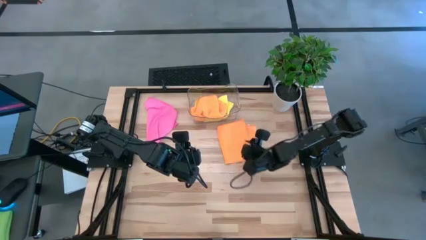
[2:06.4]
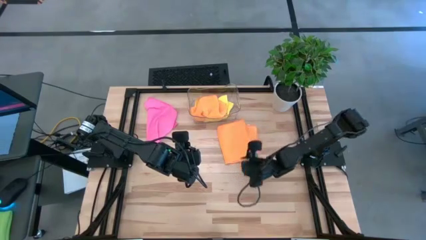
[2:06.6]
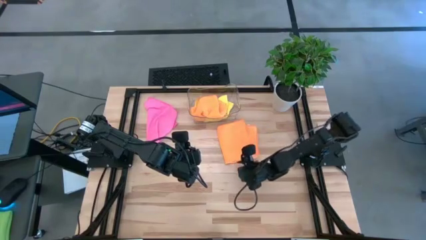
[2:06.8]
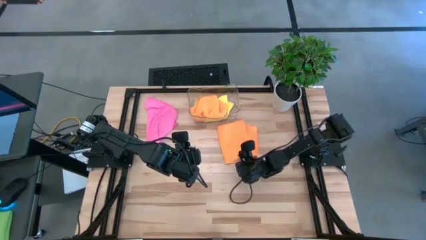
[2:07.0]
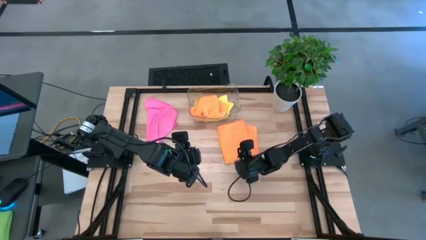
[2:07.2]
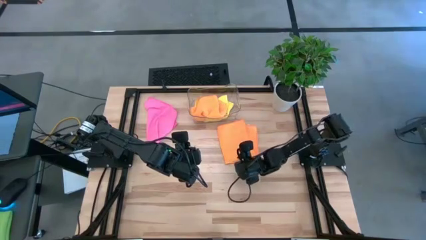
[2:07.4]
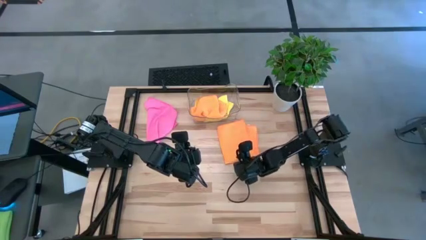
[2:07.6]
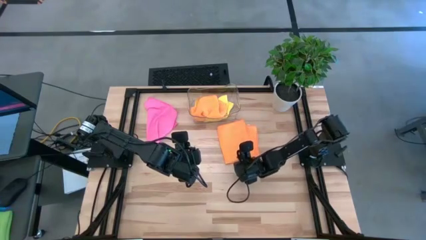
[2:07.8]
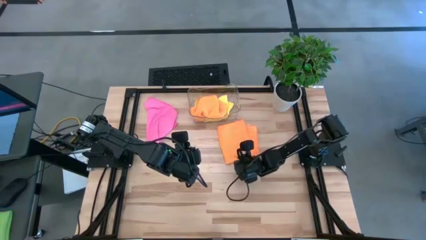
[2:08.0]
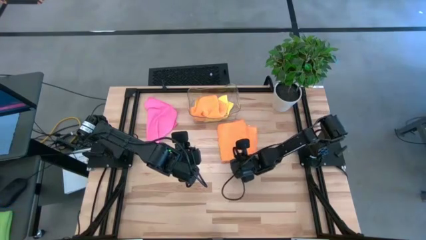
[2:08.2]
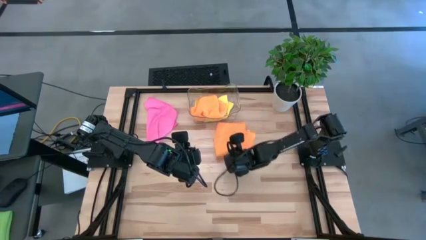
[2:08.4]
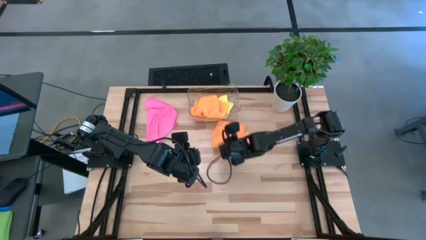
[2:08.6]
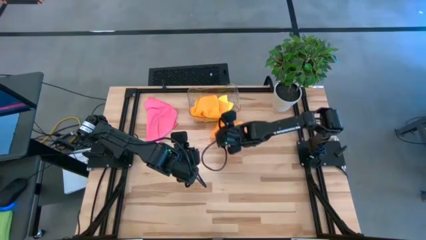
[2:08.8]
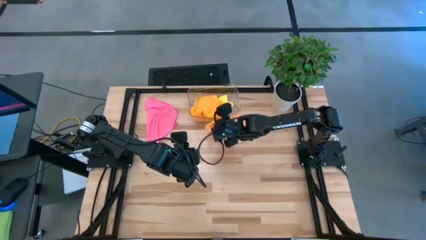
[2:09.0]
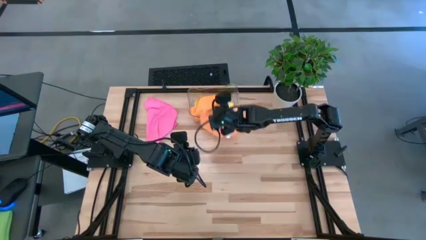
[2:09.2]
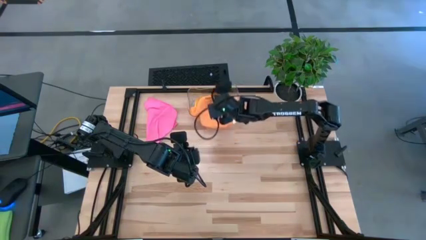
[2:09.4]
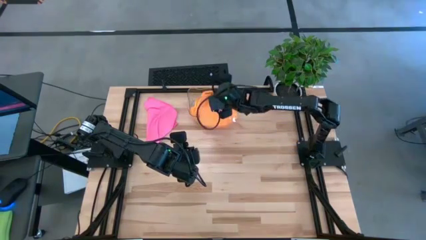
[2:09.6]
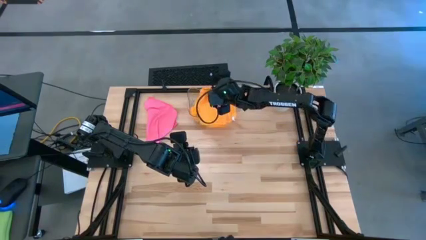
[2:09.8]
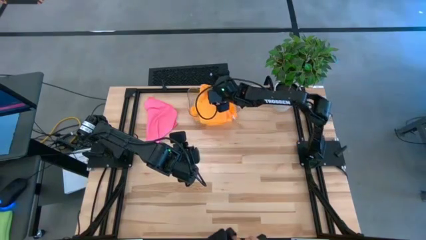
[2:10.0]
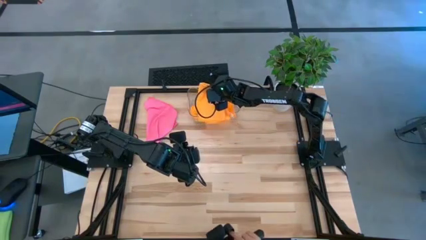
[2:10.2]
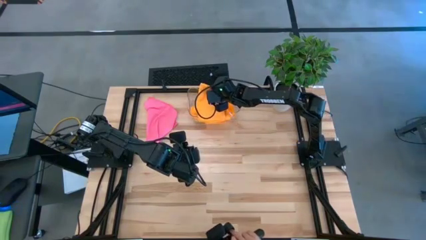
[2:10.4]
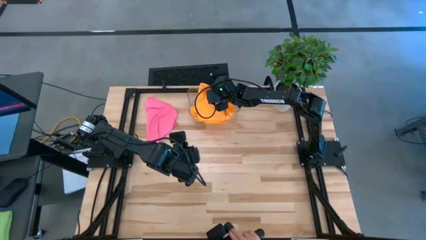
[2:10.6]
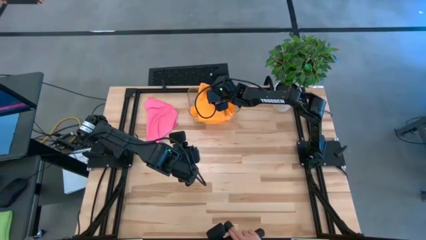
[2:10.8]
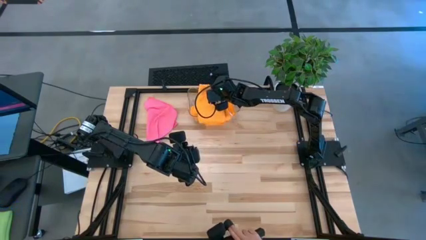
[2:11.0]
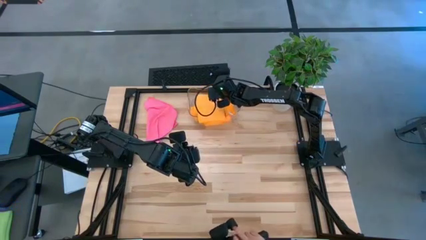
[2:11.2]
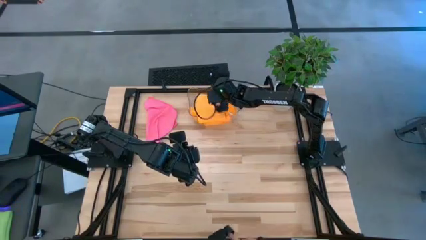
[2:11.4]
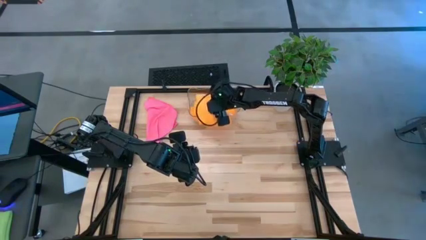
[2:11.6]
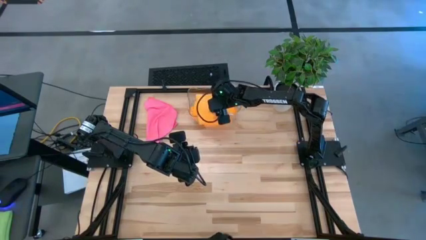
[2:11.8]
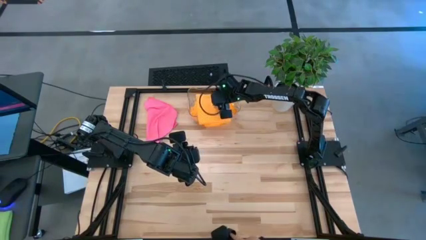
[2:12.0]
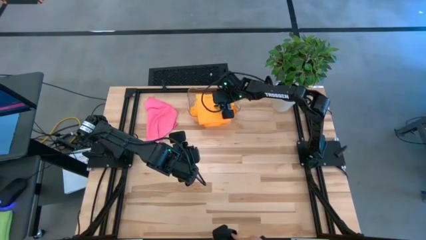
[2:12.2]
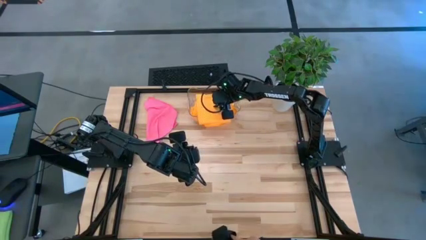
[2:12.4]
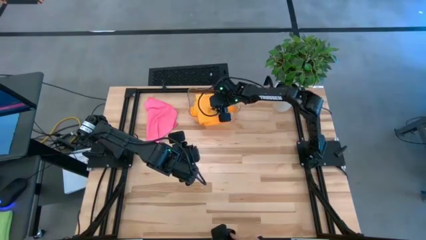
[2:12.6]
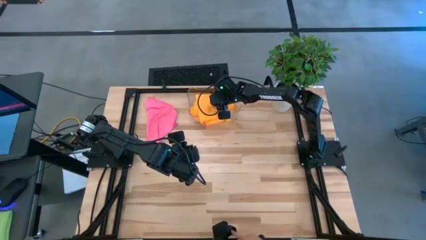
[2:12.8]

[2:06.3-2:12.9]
Task: Fold microfiber towels
Put the folded orange towel into the transparent bin

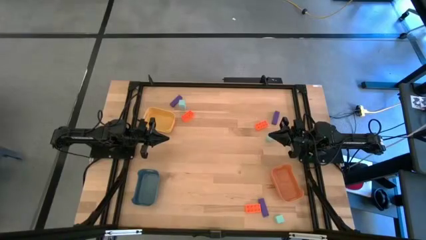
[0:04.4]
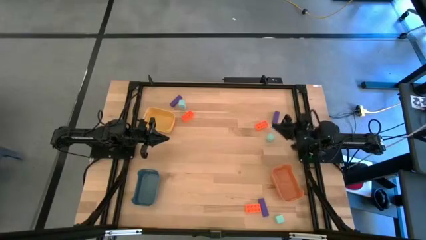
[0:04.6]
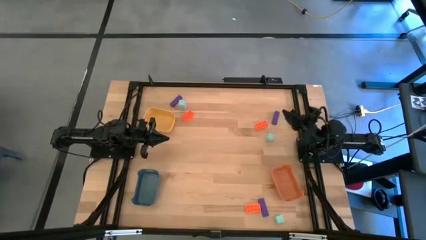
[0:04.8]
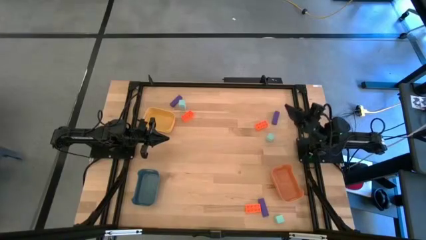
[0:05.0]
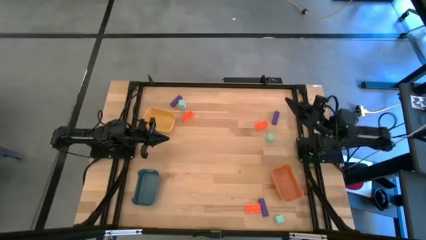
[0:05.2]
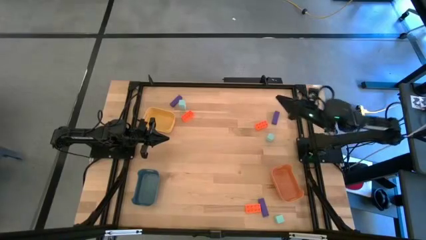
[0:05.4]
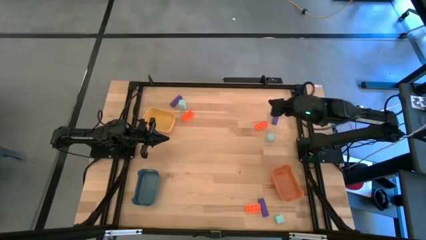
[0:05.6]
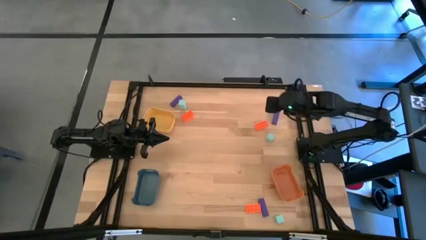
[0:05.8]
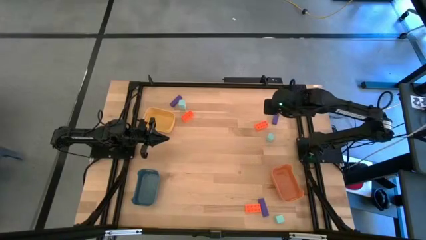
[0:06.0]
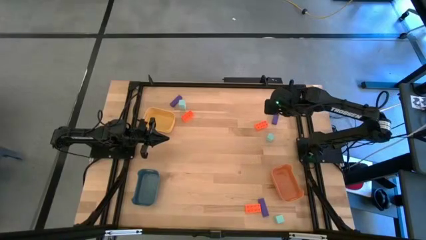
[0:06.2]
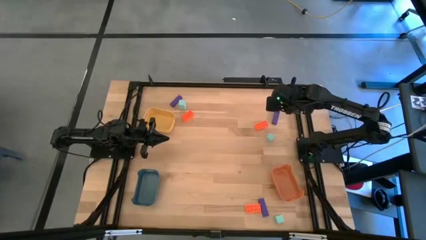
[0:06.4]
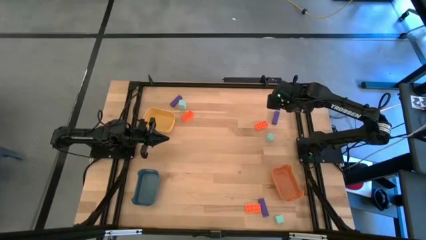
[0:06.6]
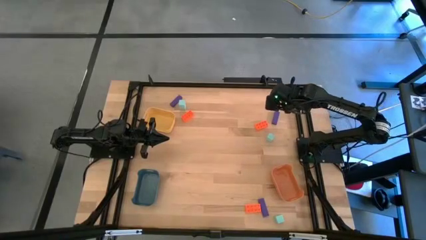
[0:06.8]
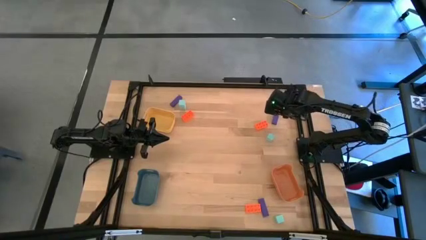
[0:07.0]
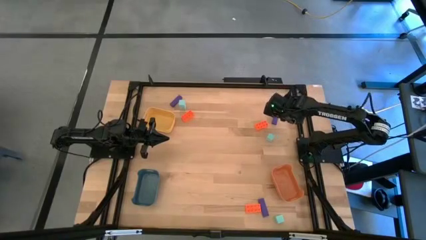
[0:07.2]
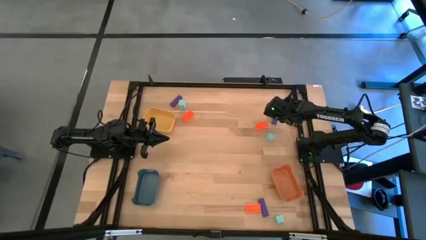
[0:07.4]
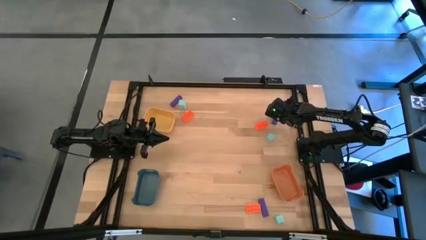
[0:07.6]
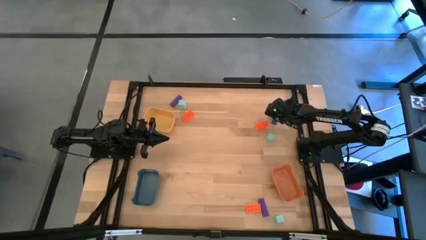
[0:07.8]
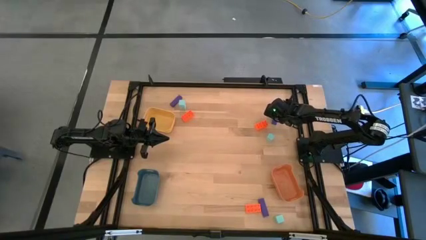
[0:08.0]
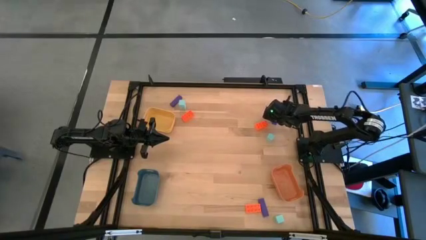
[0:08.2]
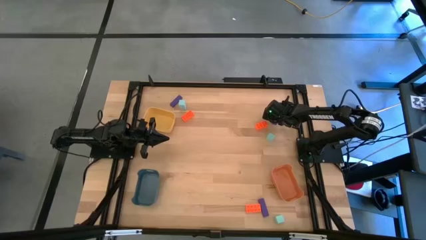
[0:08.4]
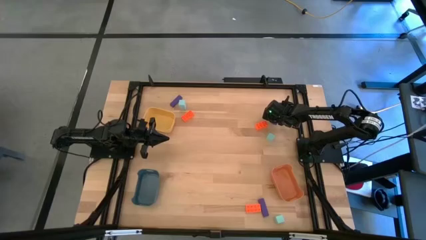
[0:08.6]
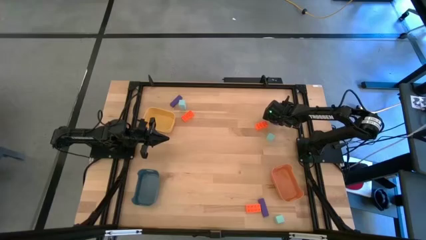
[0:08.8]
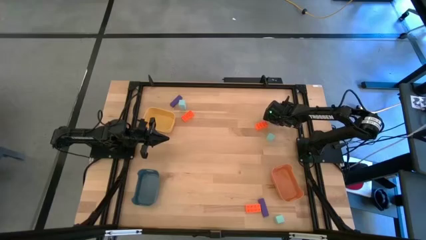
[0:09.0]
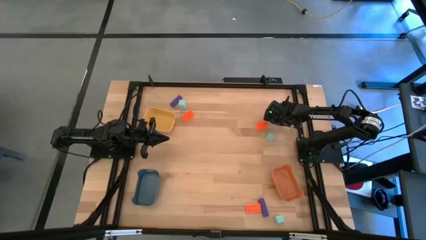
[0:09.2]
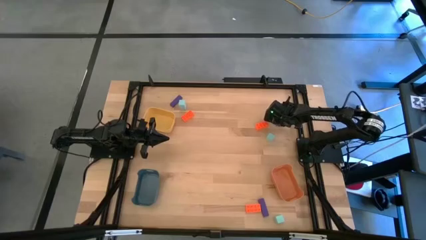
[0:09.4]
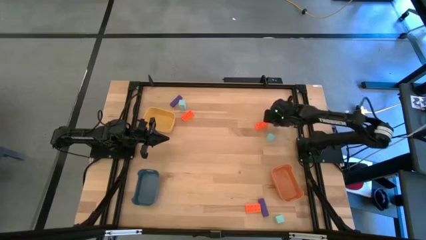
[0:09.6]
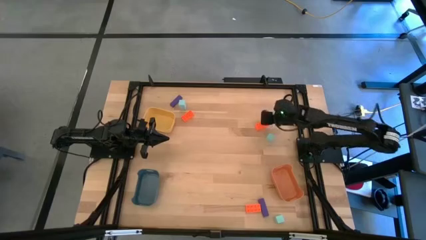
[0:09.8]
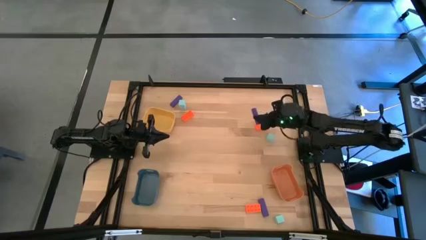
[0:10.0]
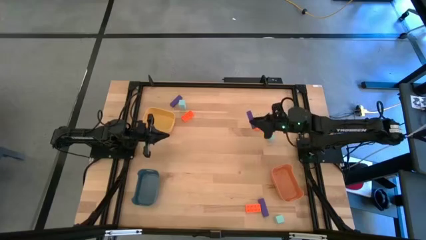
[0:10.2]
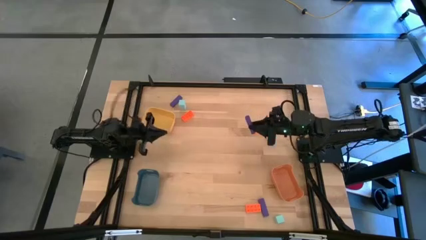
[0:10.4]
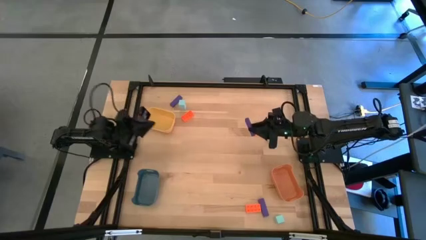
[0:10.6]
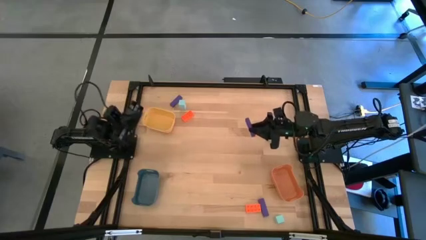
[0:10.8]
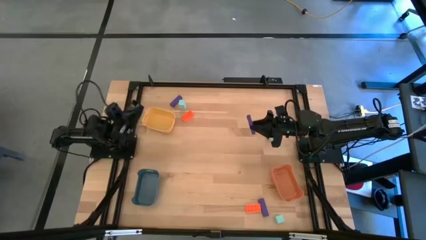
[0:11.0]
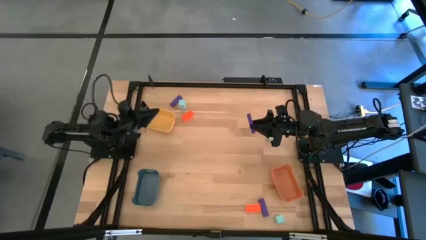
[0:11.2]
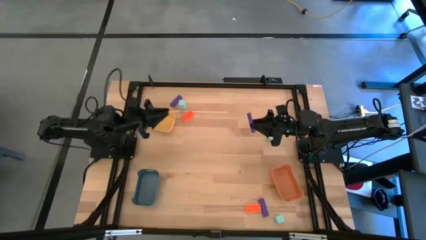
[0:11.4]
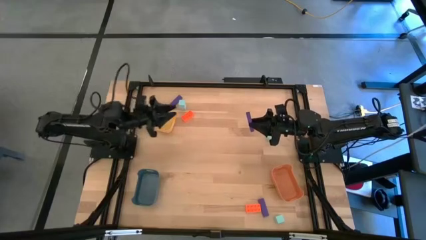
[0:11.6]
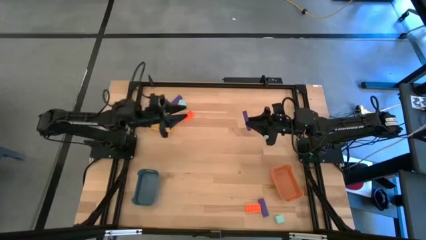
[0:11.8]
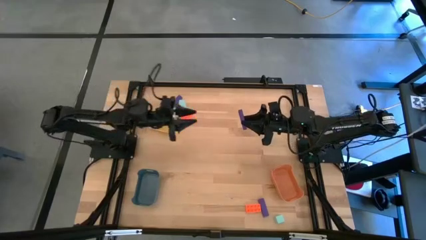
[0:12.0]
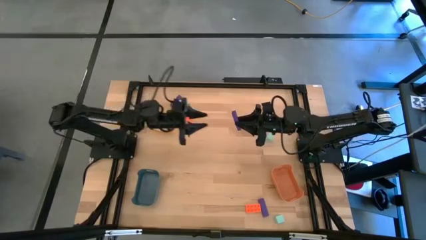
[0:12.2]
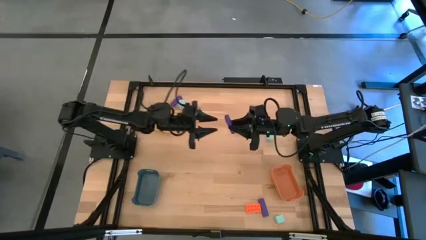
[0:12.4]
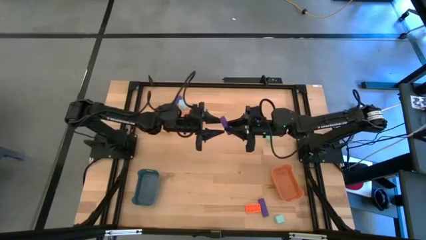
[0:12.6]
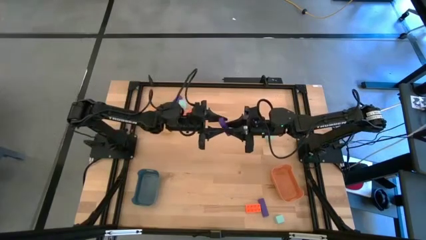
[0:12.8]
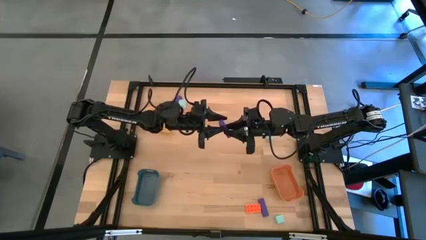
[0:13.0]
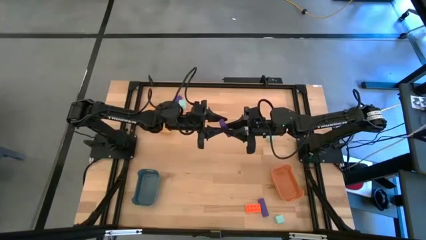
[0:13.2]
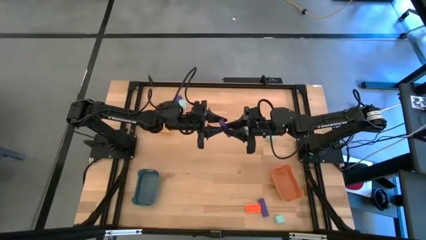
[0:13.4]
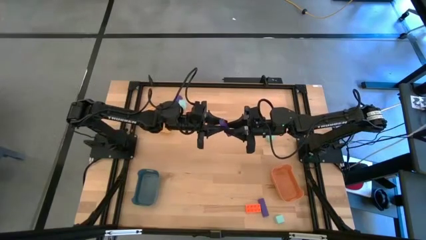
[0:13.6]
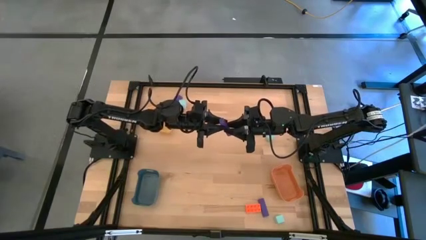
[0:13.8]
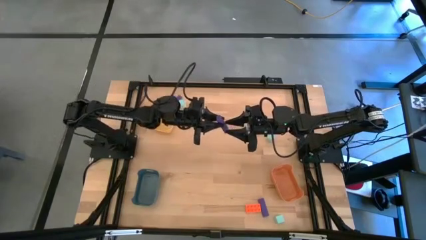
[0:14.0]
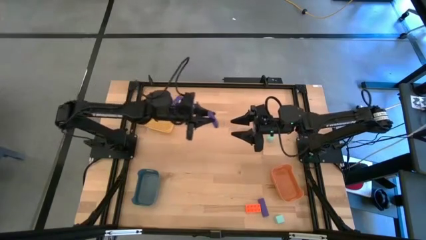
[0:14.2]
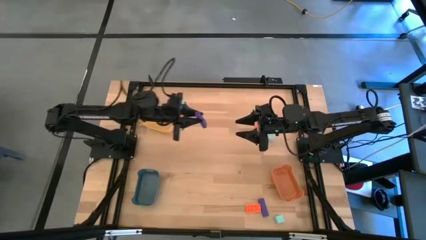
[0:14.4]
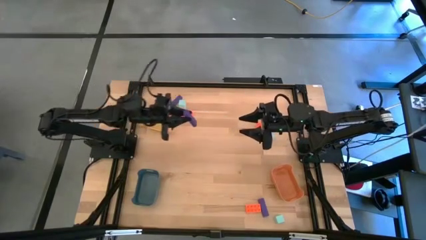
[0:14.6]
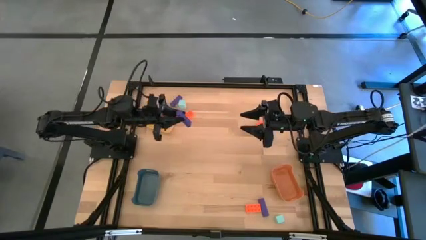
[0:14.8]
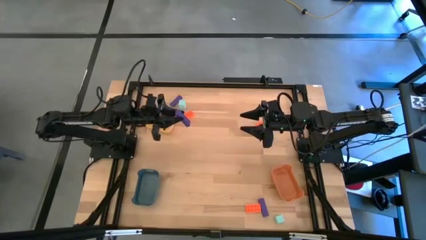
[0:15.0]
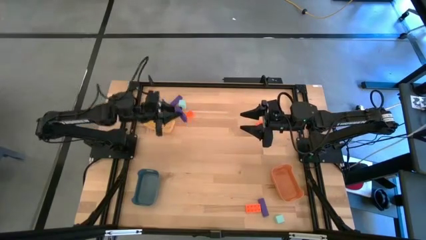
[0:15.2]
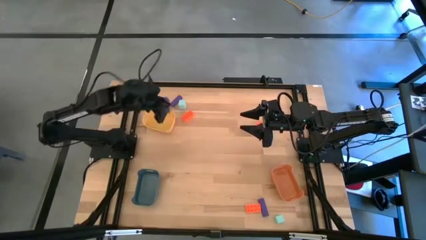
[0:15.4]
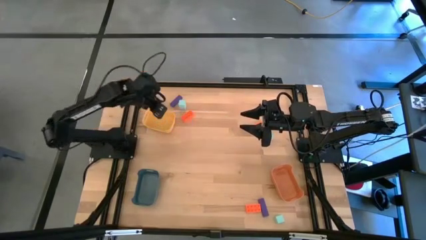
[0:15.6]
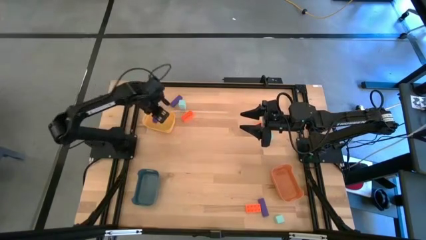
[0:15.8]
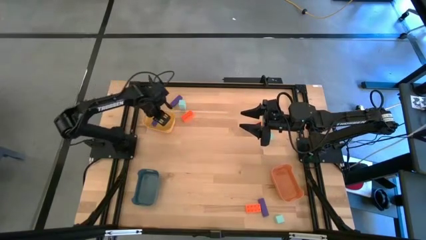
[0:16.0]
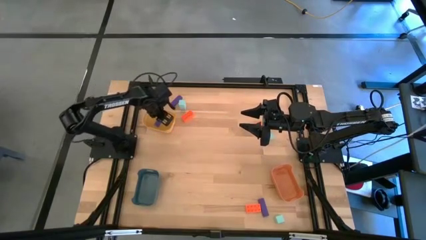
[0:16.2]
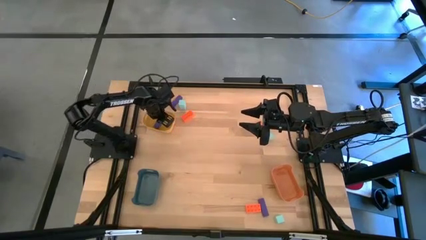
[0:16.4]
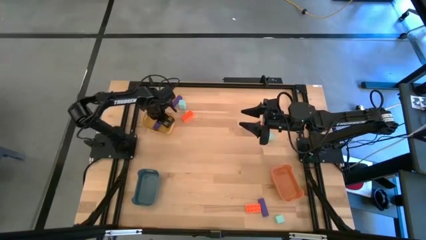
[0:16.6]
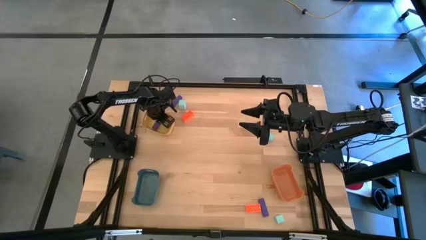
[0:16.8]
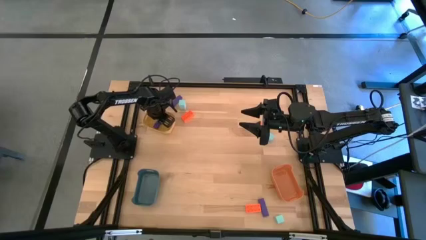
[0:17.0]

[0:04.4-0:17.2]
Task: Sort & place blocks by color
Put the top right violet wooden block into the yellow bin
